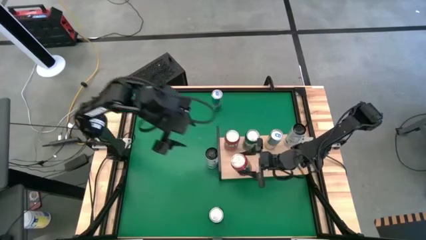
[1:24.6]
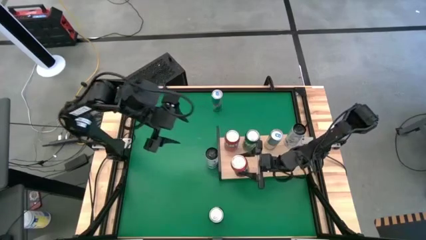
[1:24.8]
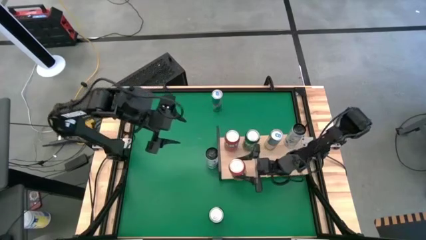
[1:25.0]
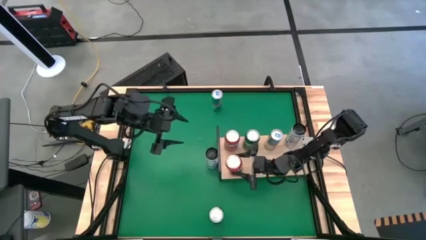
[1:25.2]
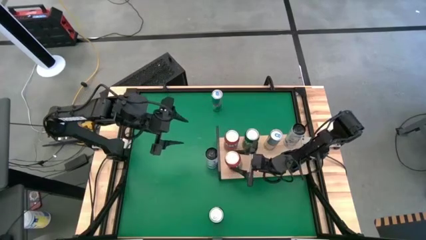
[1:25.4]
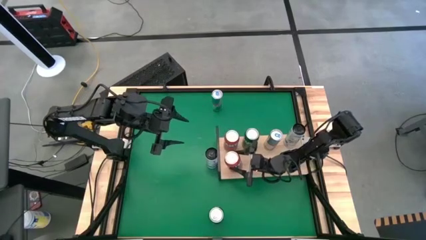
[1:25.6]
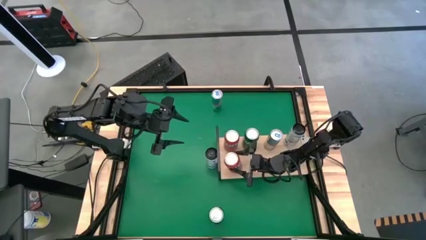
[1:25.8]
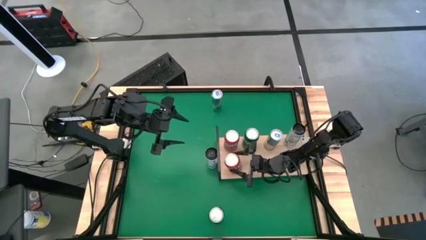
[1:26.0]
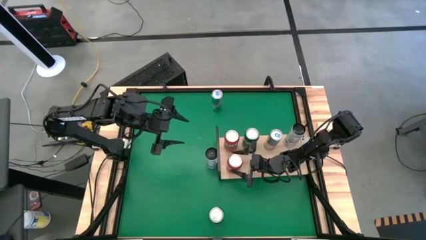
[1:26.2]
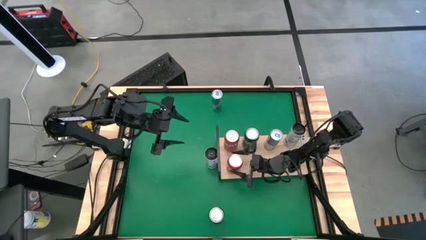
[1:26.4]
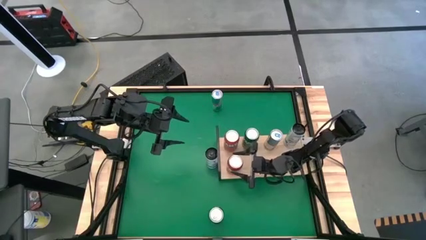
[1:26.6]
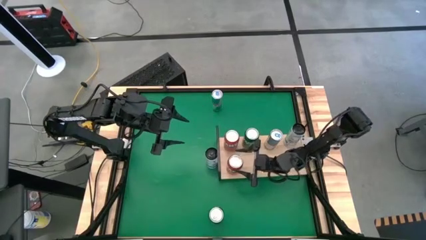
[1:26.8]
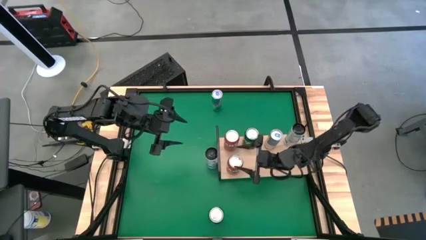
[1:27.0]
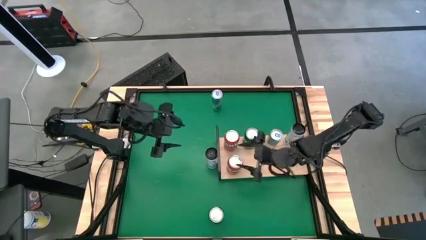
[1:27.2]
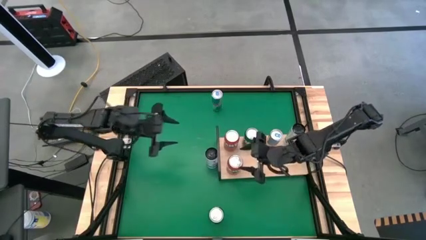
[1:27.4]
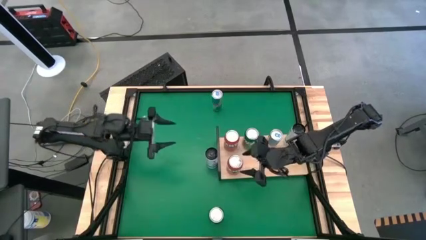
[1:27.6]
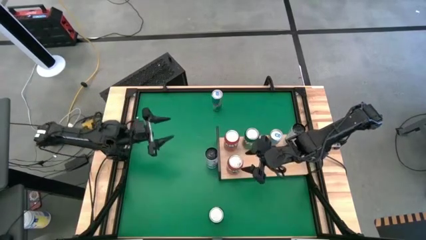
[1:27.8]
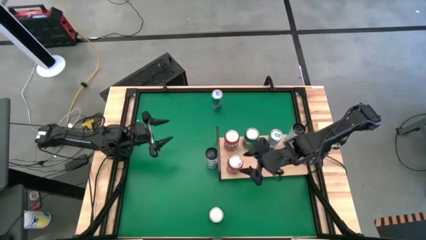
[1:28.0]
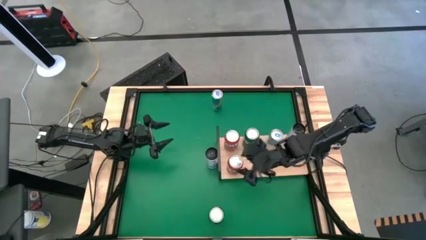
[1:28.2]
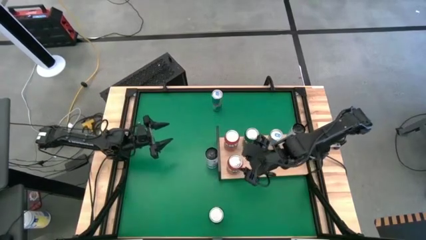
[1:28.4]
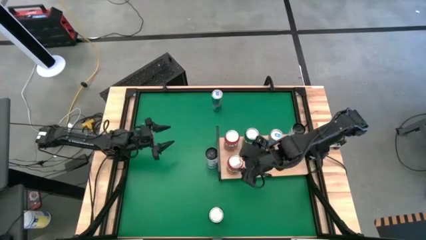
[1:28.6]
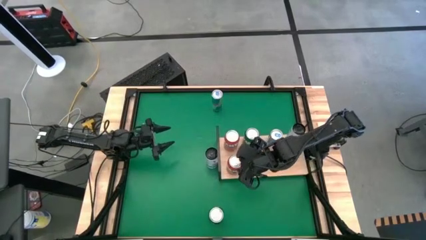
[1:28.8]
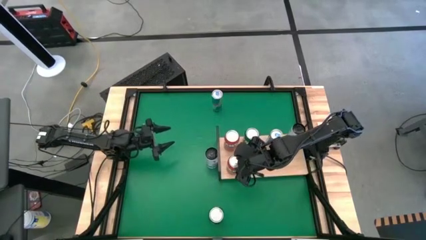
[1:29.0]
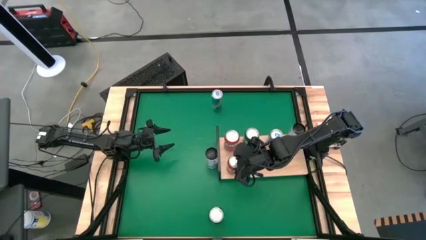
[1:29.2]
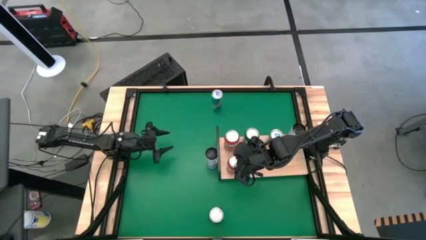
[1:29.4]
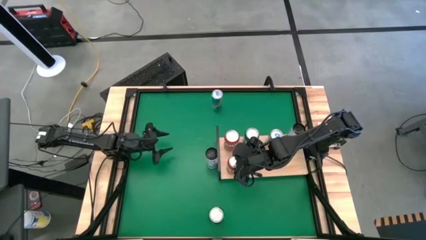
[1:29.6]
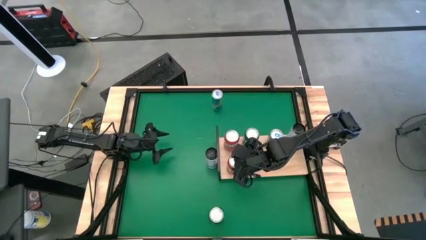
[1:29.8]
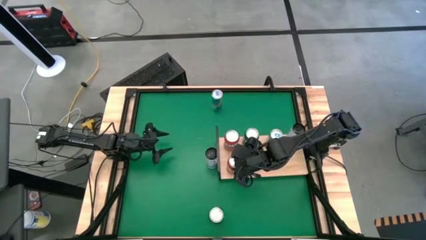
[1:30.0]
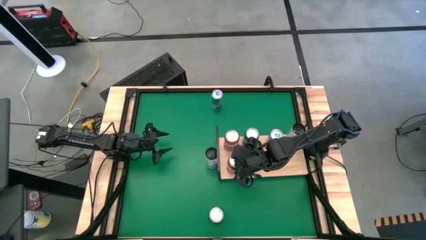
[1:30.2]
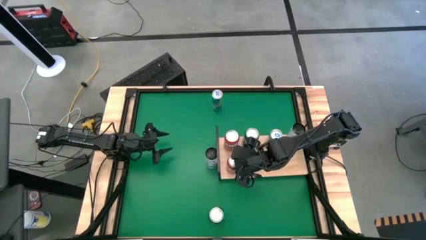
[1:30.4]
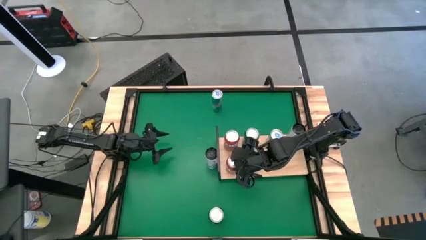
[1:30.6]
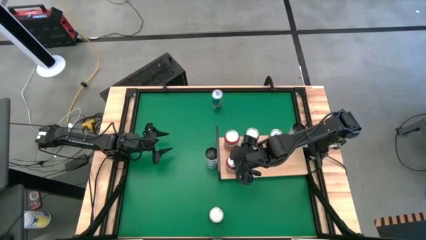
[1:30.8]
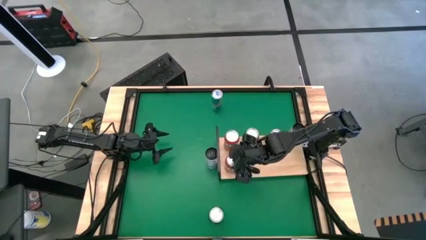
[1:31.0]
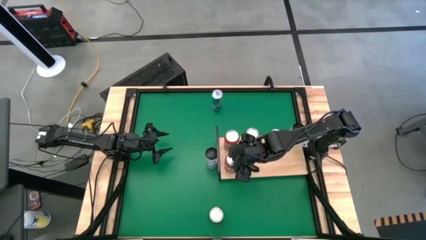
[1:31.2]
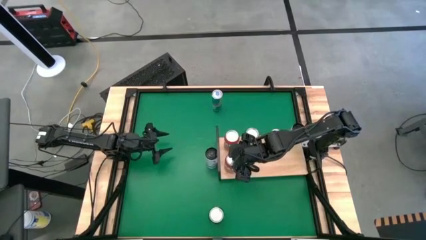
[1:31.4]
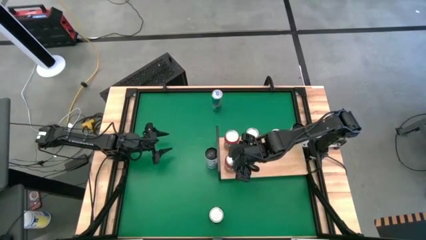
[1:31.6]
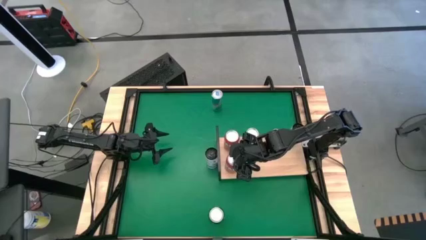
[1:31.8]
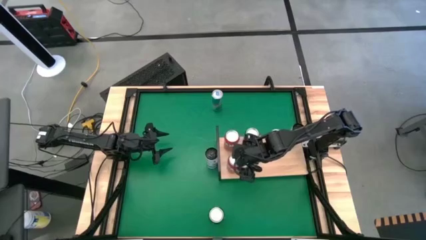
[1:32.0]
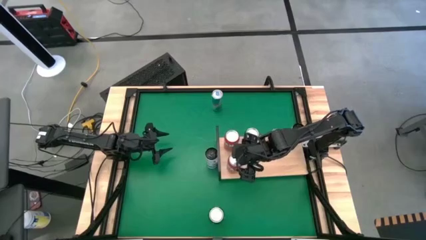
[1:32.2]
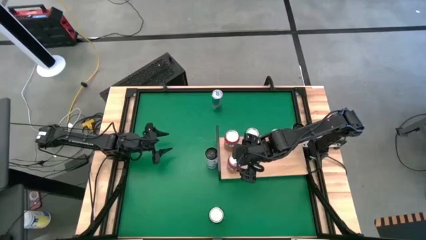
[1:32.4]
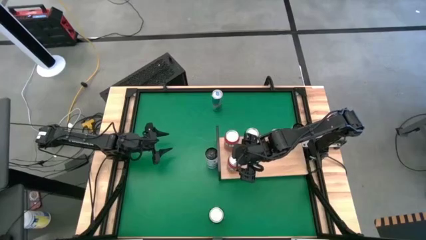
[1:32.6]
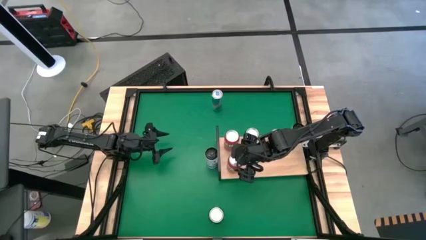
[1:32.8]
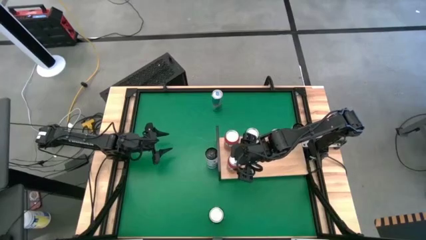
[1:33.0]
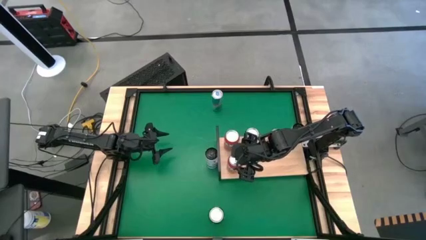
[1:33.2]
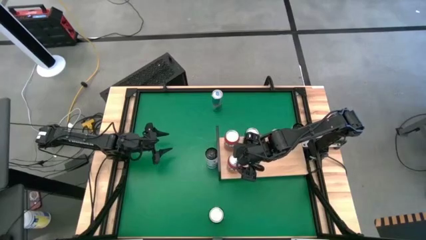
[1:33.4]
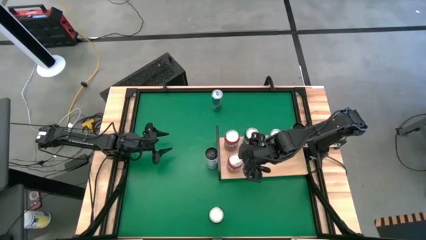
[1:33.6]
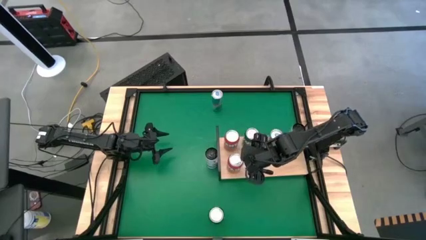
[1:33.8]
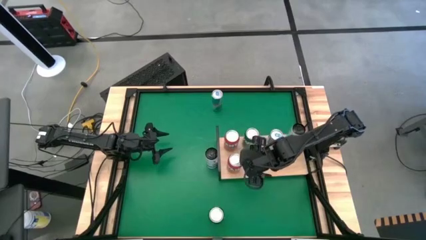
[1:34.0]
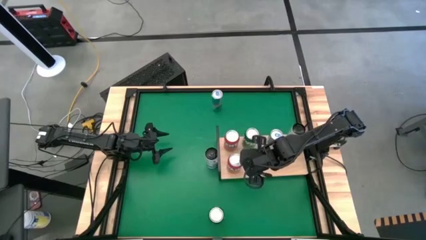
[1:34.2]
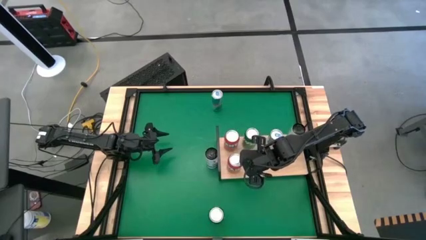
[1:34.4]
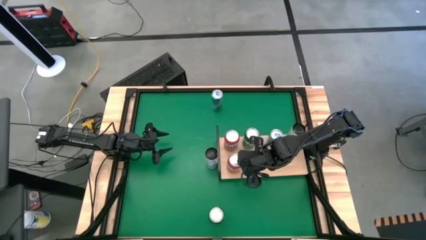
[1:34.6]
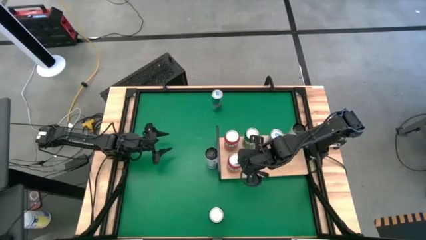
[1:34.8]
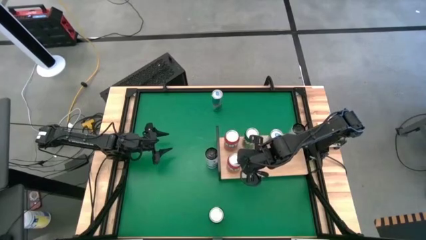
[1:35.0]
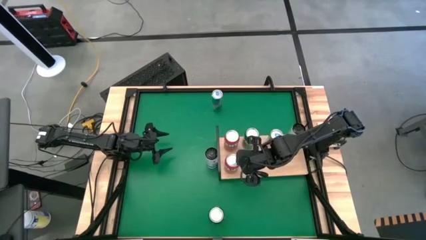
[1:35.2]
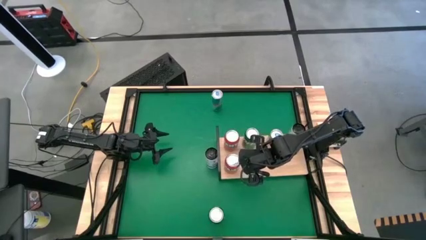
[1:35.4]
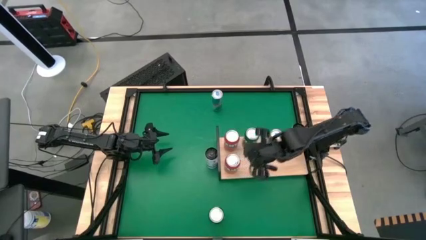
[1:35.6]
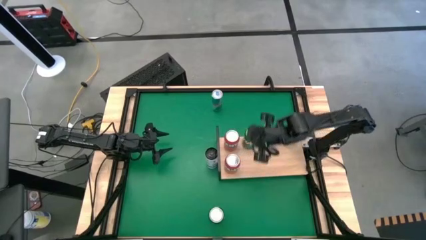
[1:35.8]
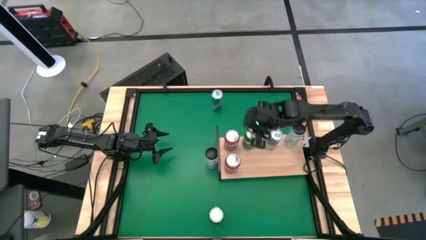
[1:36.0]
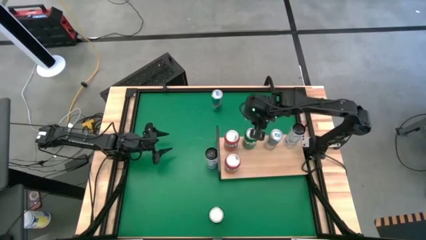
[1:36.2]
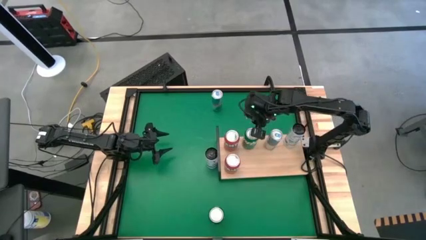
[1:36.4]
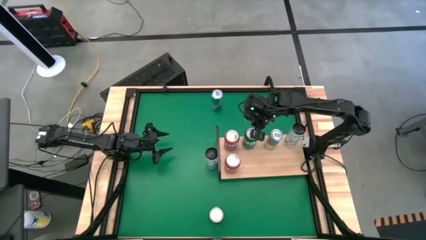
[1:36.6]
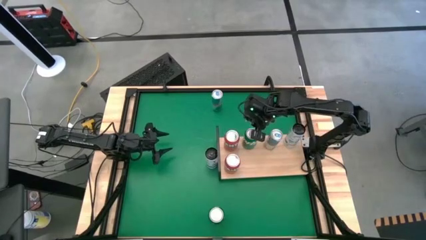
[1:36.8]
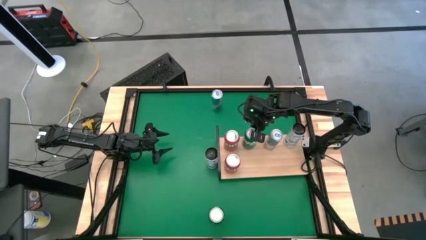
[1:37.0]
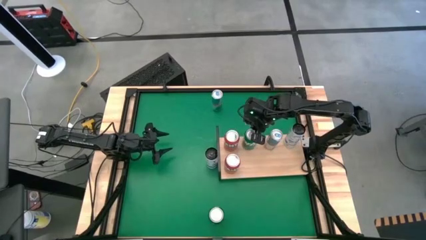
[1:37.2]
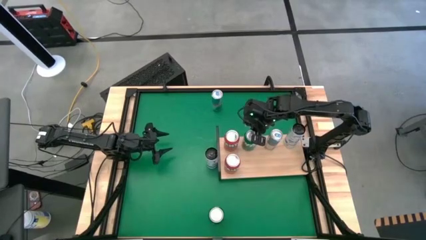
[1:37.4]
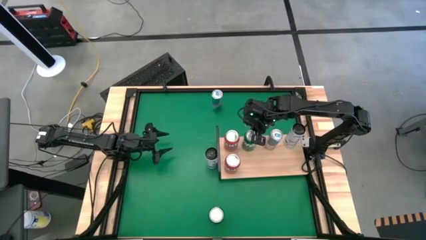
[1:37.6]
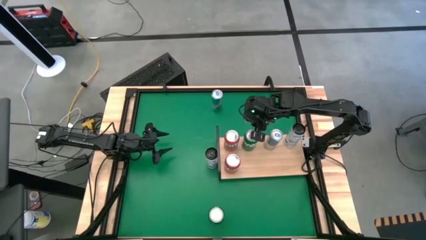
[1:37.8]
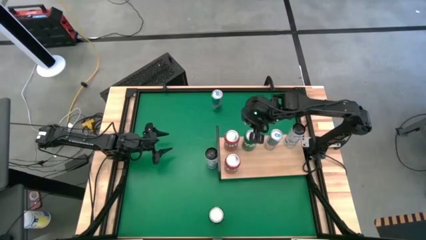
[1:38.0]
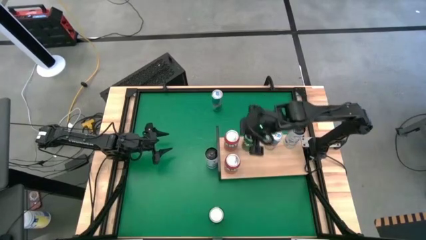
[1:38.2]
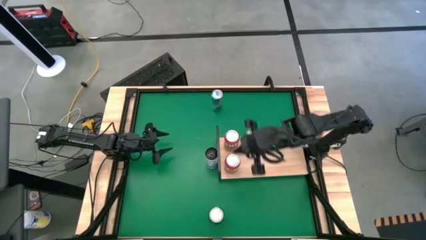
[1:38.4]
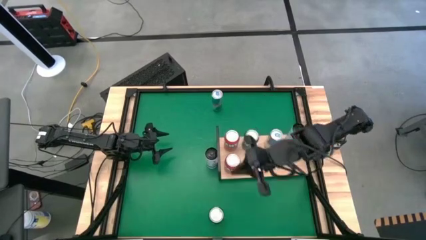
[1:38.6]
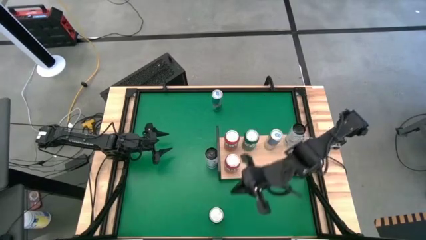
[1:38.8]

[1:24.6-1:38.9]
Task: Place canned beverage on shelf
Put the orange soda can on the shelf

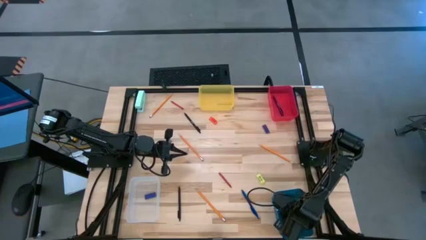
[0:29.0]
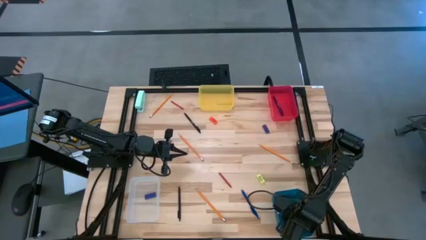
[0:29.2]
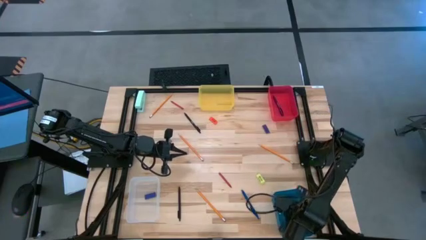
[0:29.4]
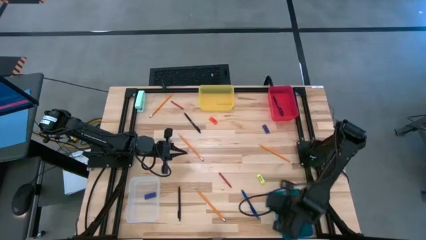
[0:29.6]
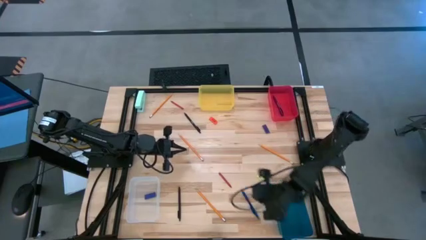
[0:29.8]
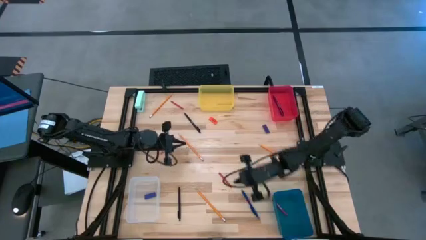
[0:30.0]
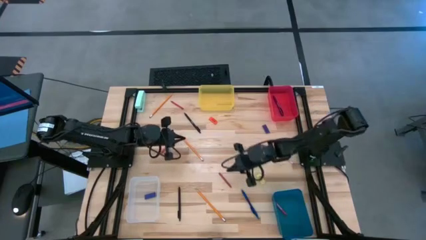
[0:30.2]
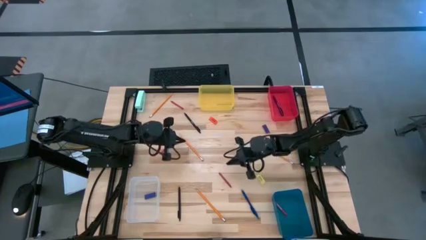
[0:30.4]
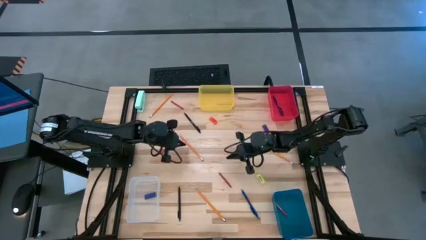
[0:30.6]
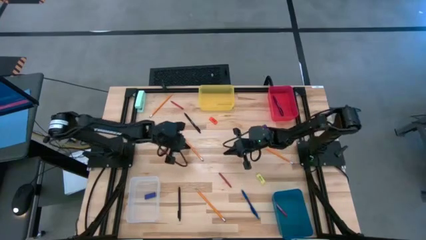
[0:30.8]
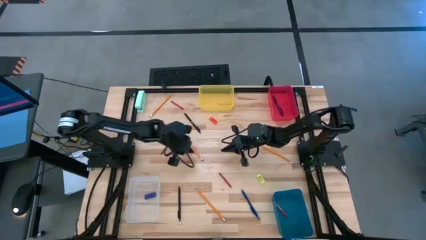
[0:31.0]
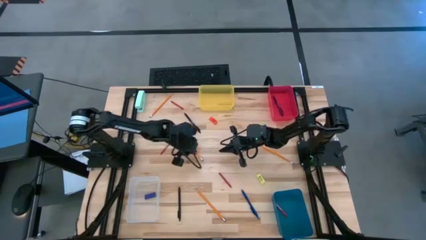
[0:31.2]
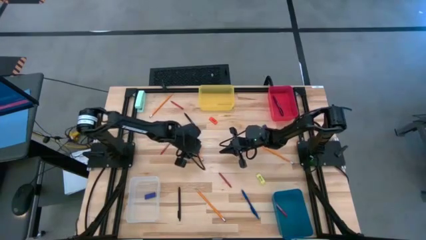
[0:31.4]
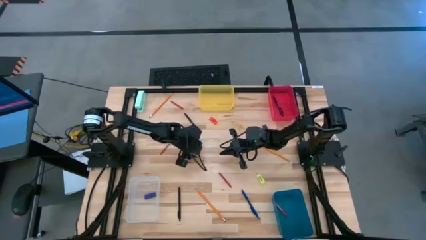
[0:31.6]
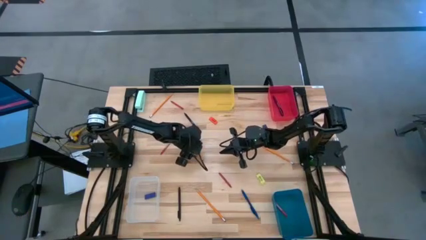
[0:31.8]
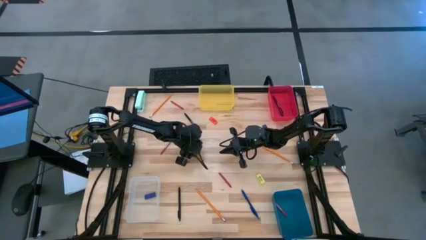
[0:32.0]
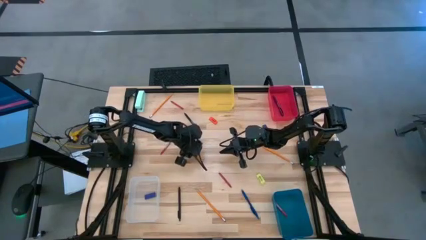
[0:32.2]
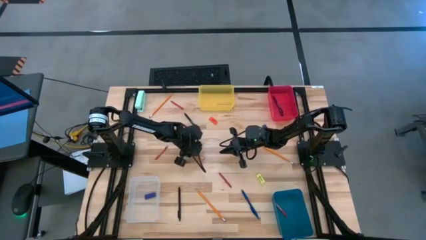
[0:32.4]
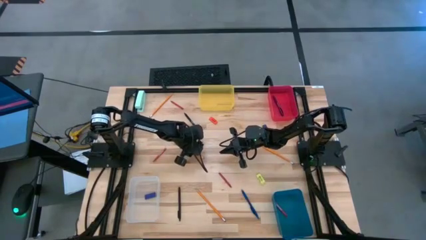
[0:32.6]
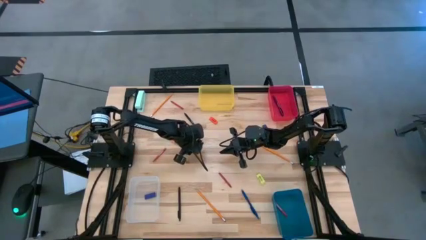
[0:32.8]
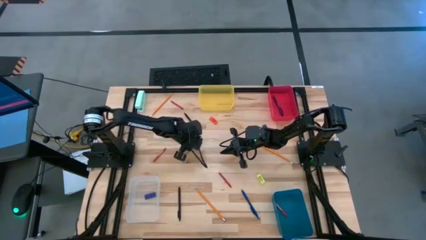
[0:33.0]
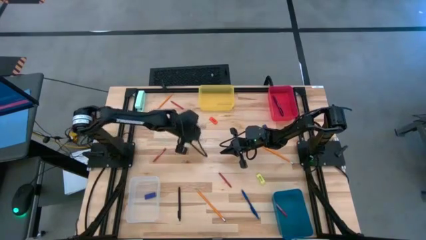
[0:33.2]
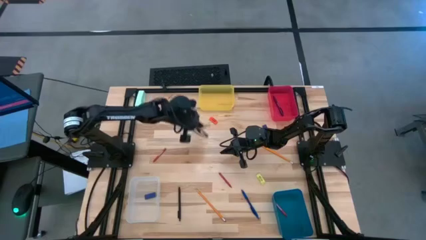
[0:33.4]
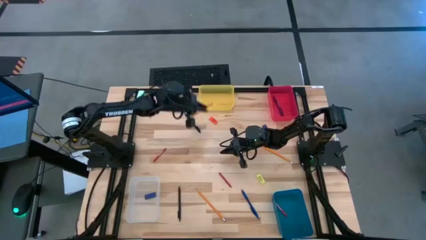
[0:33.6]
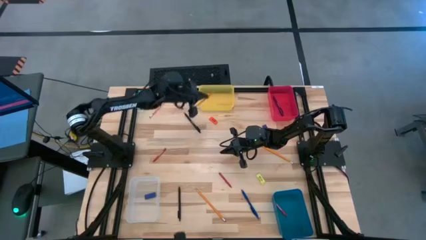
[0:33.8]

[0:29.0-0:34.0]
Task: Sort crayons/erasers/pens/pencils in bins
Put the orange pencil into the yellow bin
